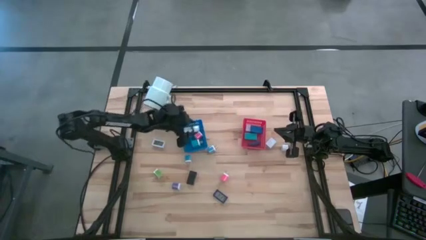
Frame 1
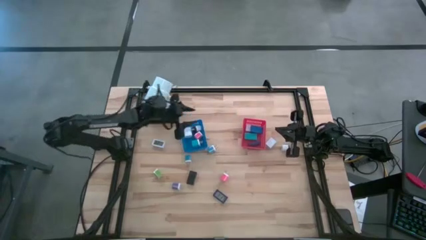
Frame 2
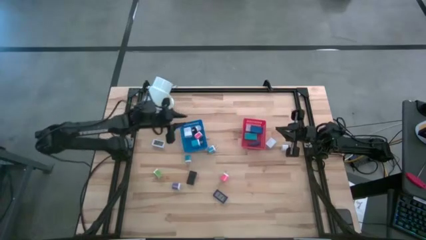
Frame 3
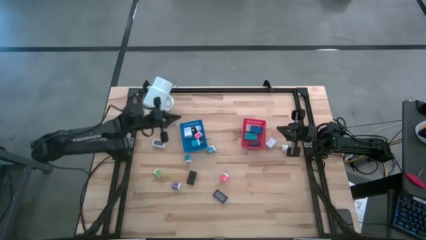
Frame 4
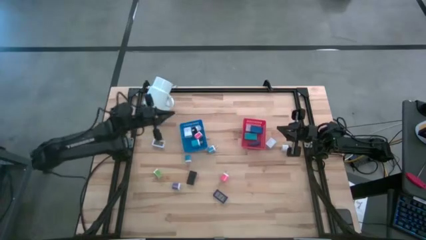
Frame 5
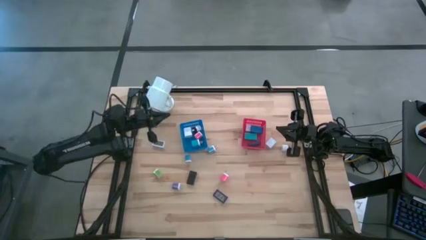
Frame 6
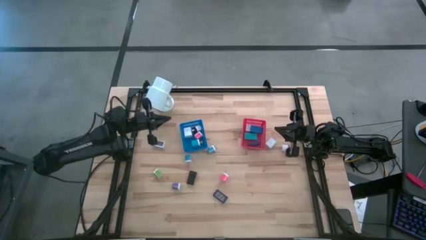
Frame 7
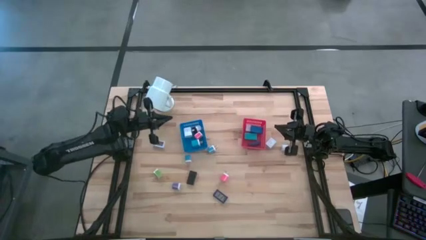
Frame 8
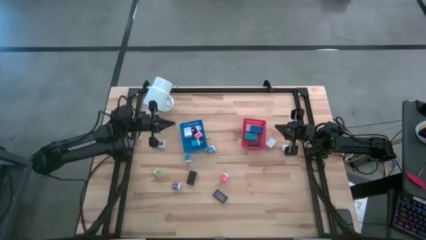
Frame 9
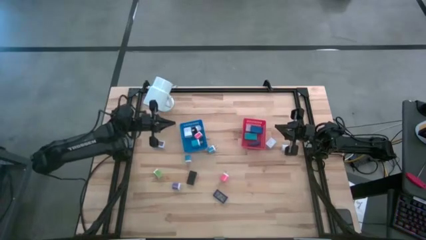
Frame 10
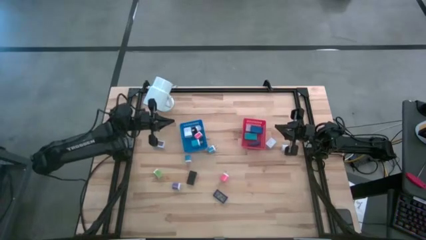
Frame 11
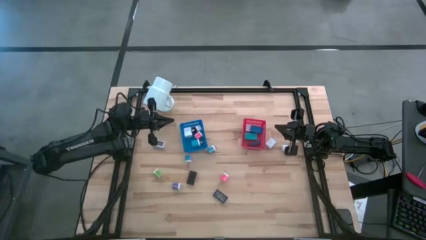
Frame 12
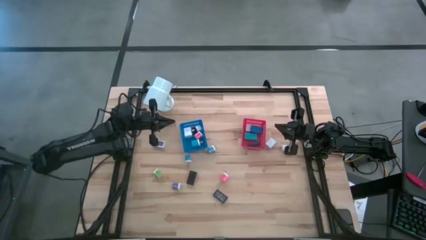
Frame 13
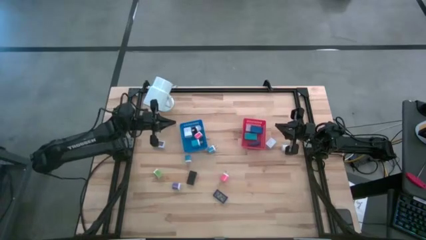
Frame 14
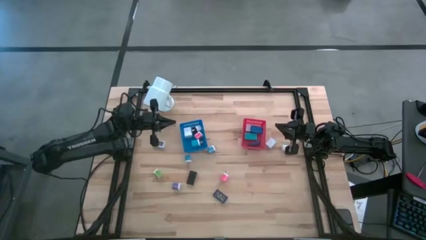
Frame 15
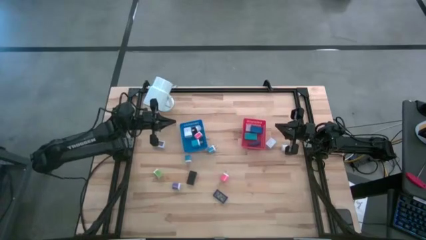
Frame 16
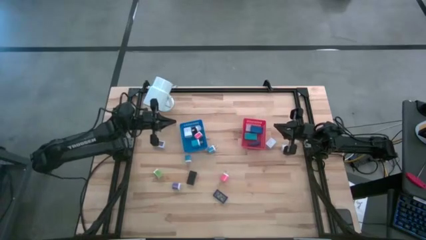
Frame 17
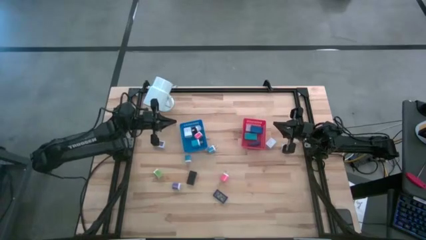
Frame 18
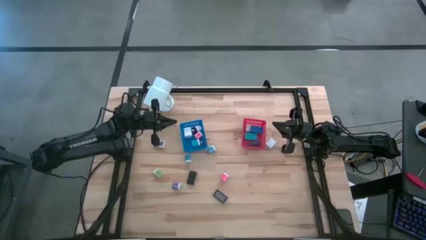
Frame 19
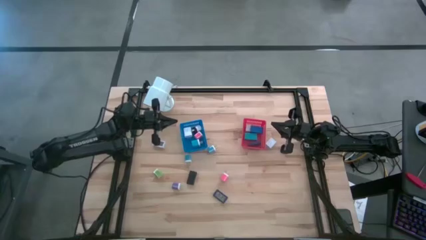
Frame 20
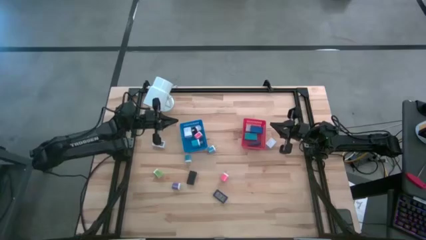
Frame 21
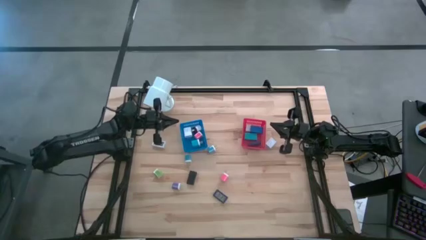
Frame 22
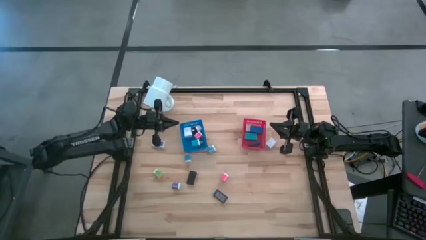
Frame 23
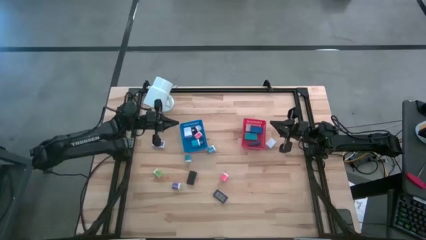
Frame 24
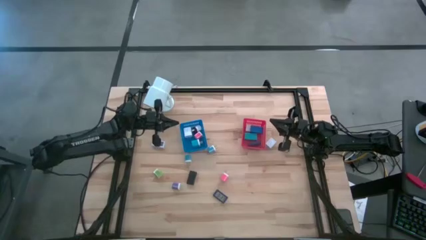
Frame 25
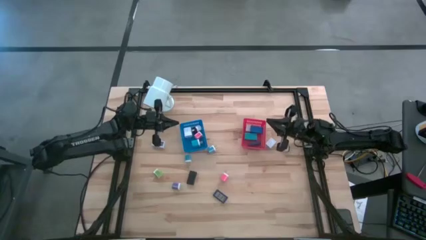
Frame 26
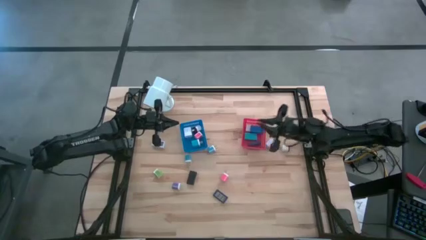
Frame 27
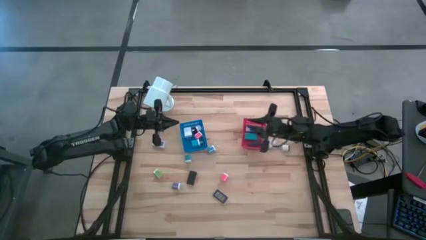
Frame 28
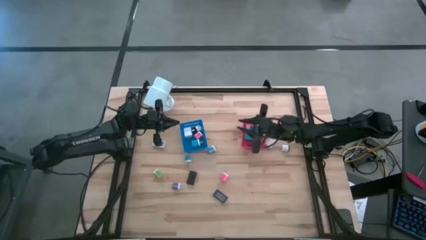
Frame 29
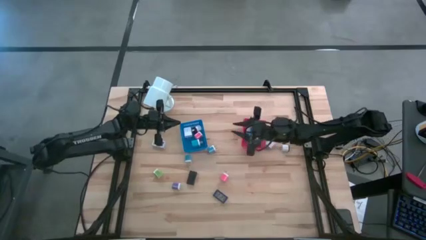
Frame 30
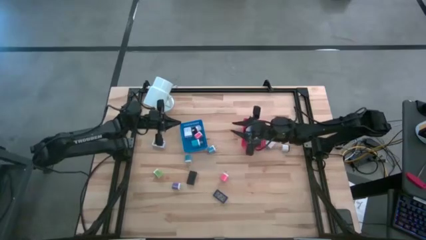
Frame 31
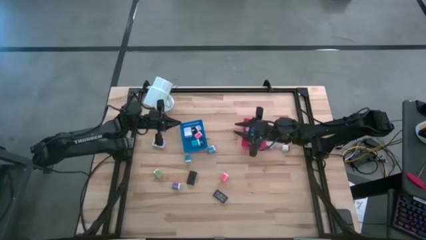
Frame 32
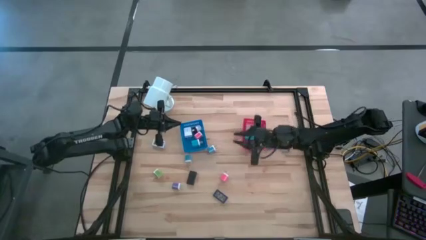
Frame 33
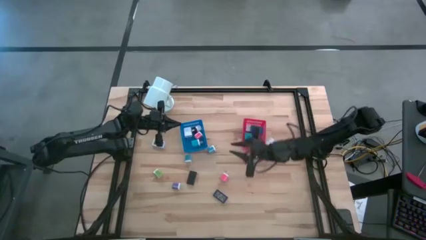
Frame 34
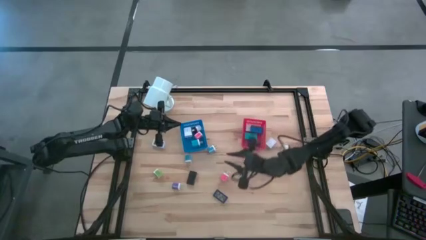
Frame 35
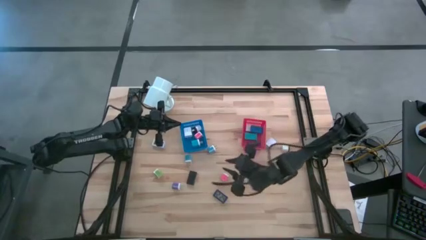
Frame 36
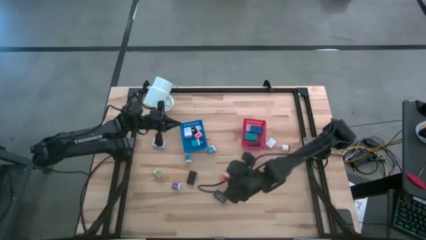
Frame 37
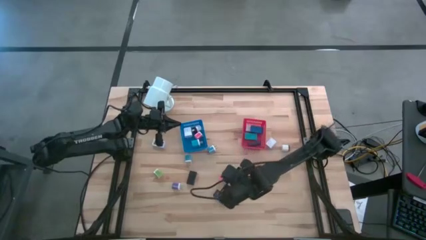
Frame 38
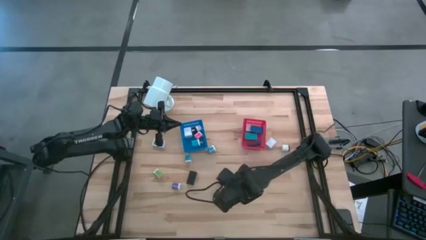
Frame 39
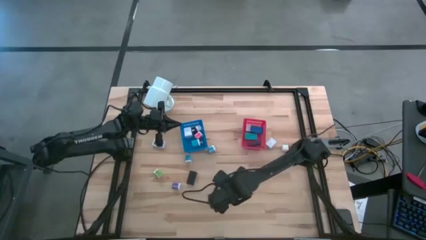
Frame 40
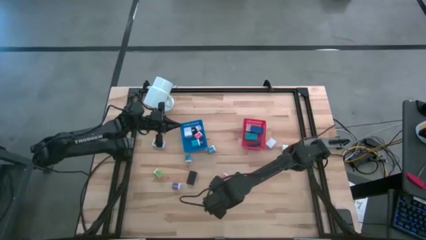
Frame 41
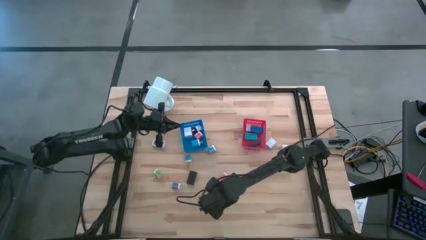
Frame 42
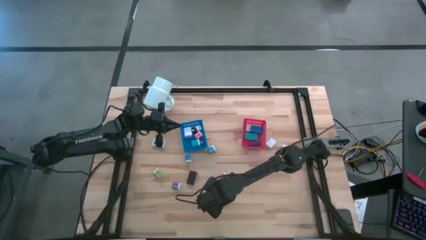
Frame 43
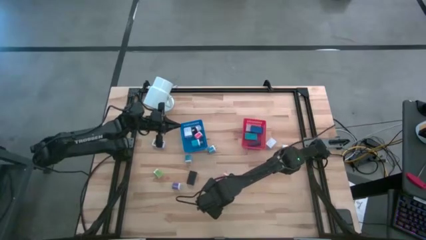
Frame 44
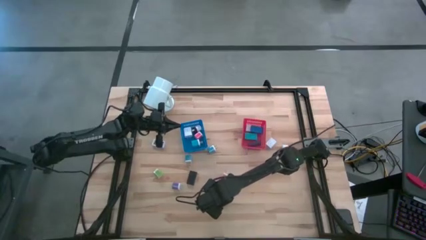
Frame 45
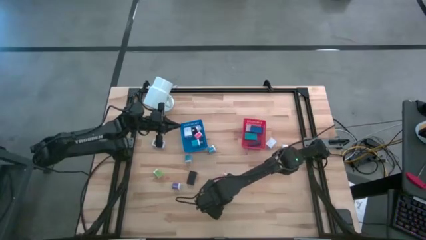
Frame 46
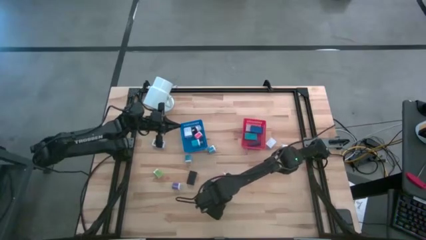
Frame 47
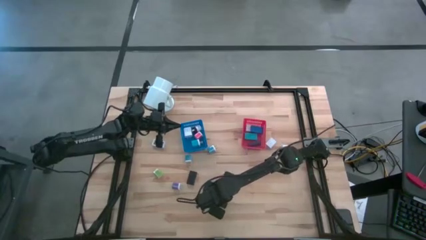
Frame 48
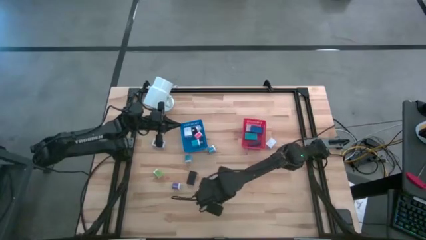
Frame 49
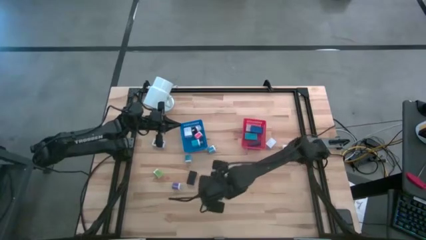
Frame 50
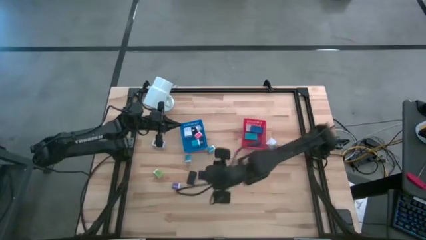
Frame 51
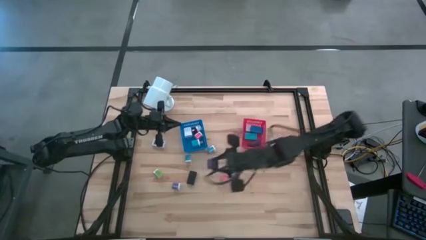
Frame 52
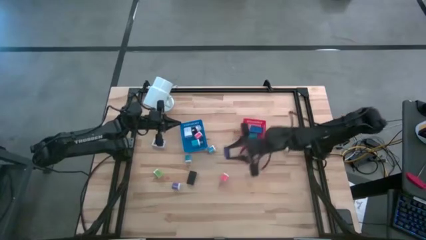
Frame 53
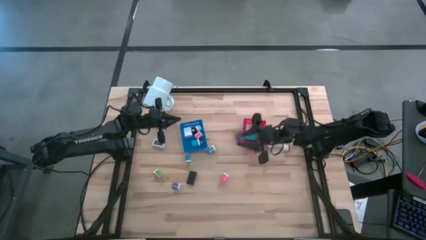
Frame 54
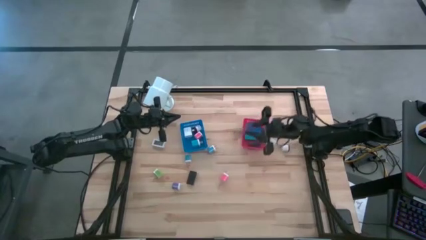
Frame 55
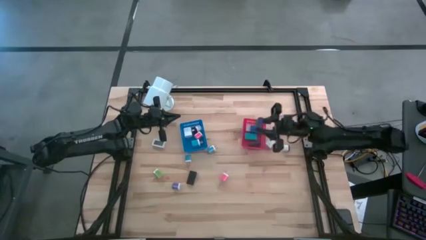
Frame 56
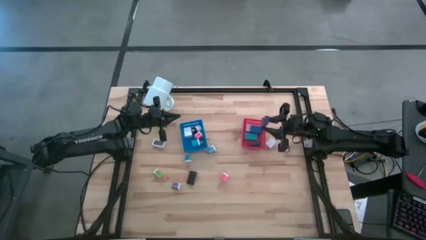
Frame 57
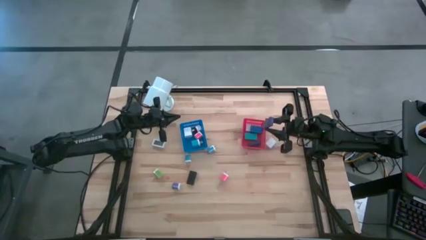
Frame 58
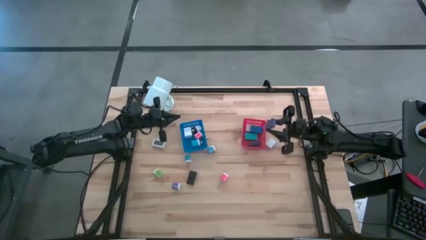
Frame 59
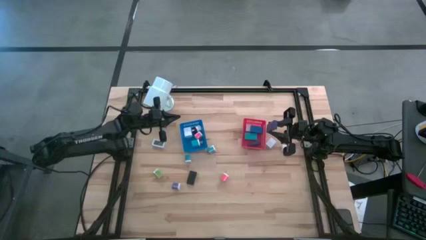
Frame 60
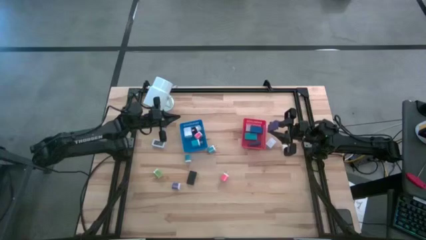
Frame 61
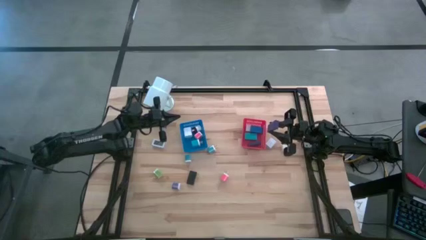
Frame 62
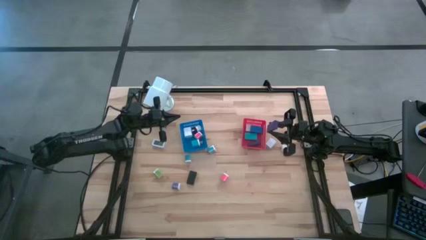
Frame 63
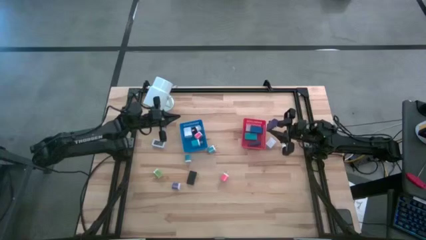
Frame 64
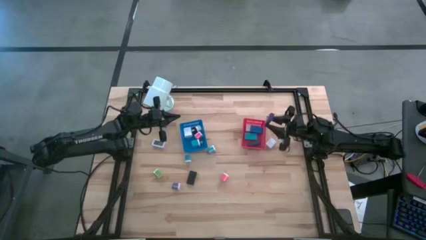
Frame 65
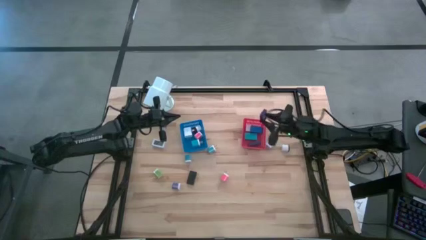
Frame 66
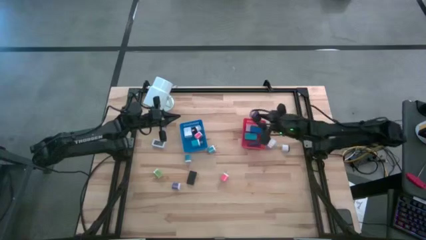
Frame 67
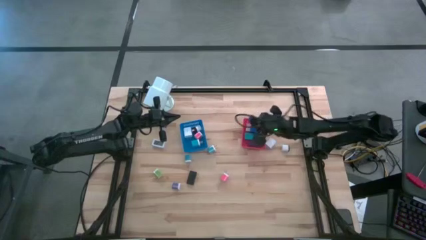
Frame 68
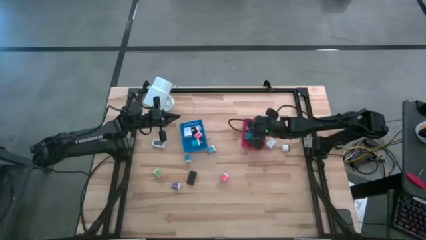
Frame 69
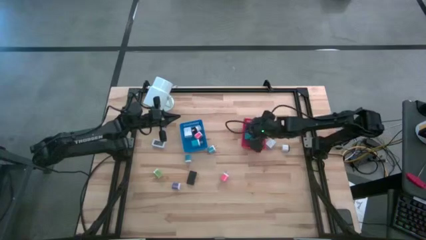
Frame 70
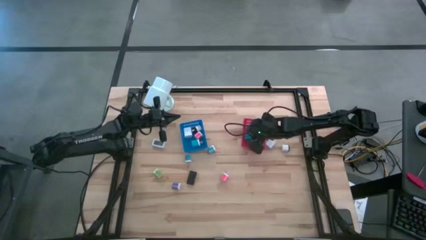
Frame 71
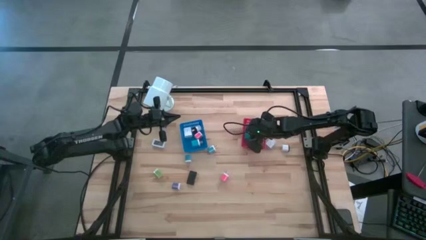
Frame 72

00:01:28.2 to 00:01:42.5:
Task: Pick & Place Office items
Put the purple digital clock into the red bin
